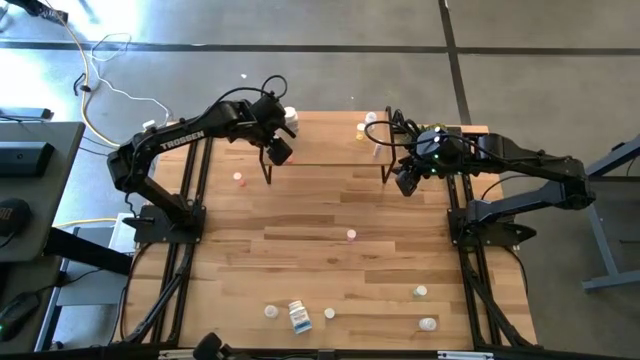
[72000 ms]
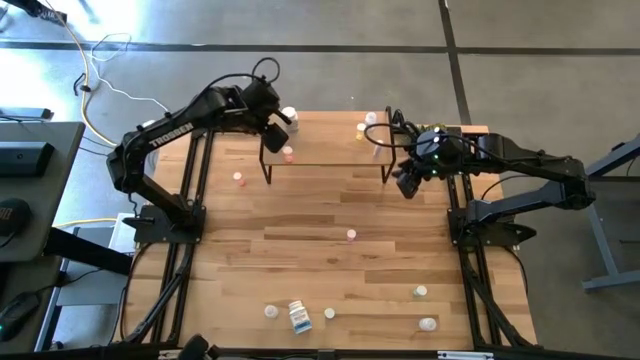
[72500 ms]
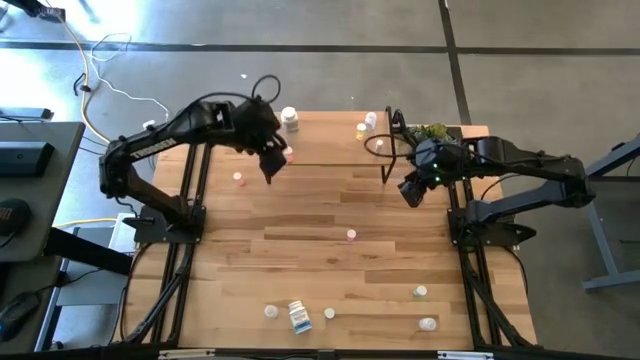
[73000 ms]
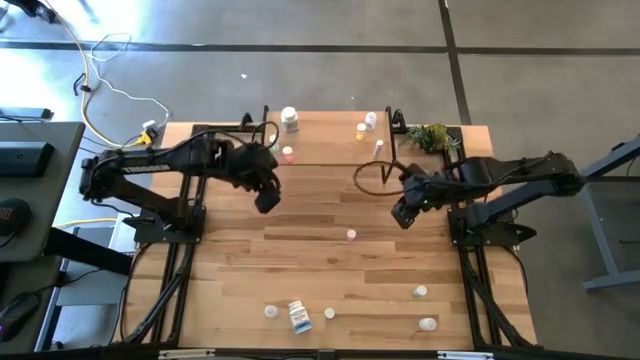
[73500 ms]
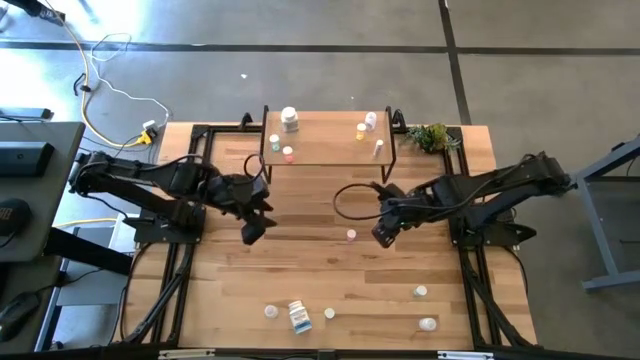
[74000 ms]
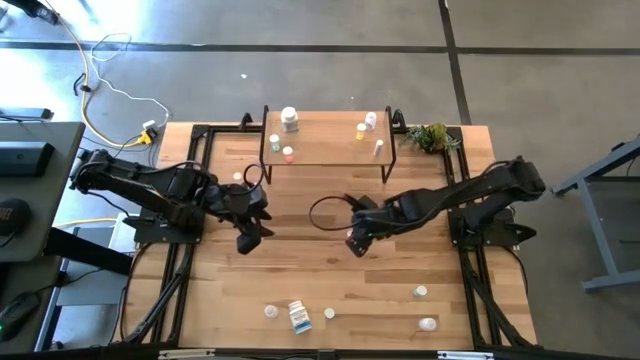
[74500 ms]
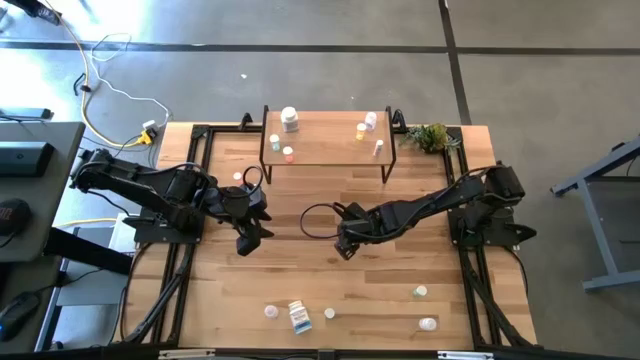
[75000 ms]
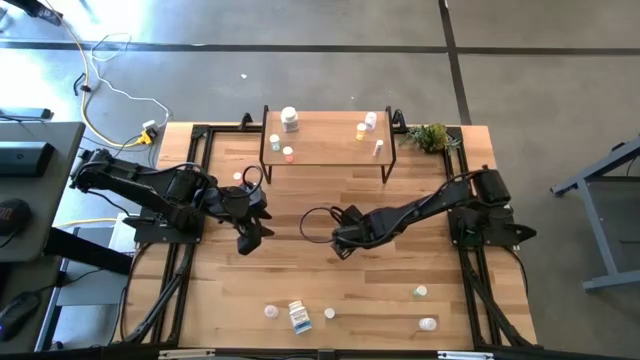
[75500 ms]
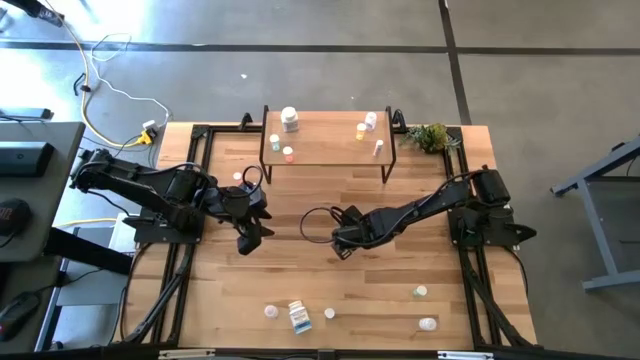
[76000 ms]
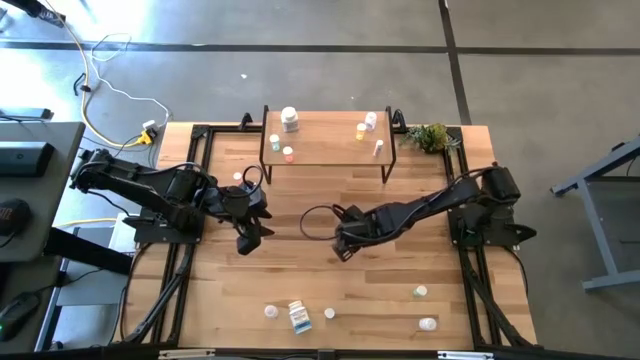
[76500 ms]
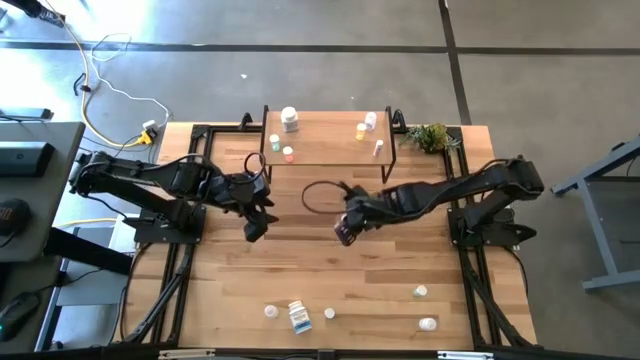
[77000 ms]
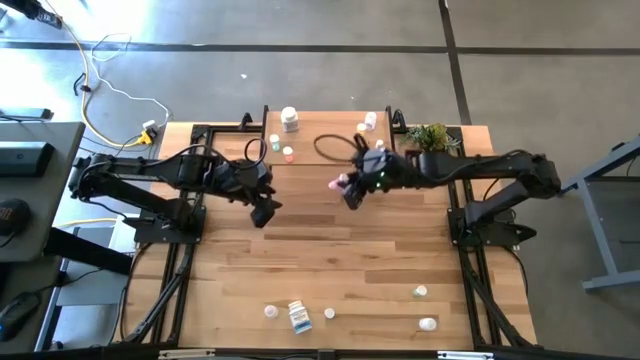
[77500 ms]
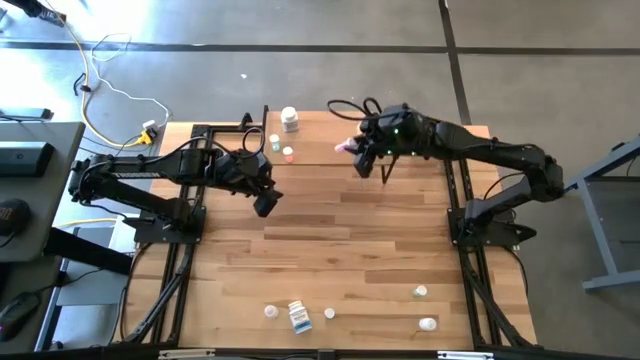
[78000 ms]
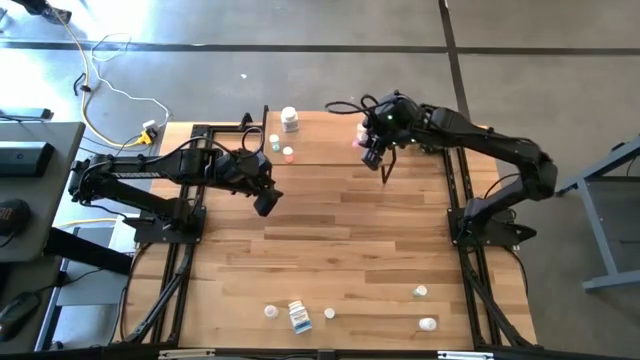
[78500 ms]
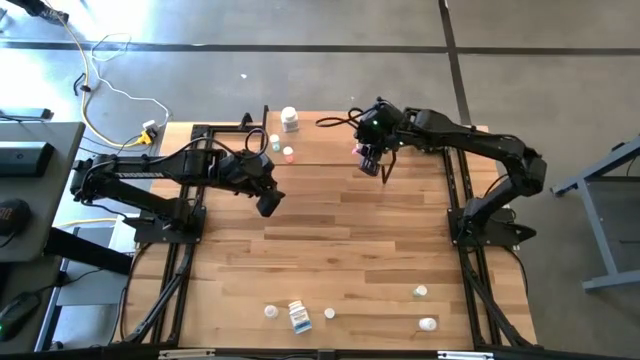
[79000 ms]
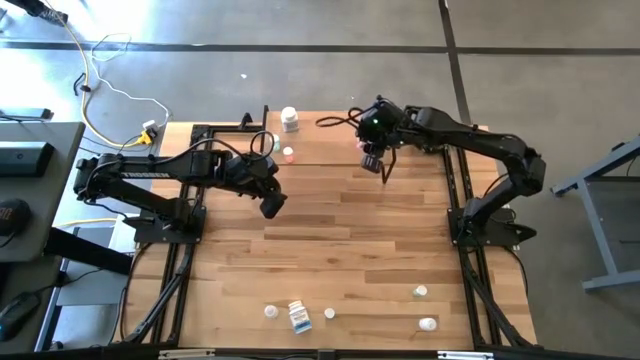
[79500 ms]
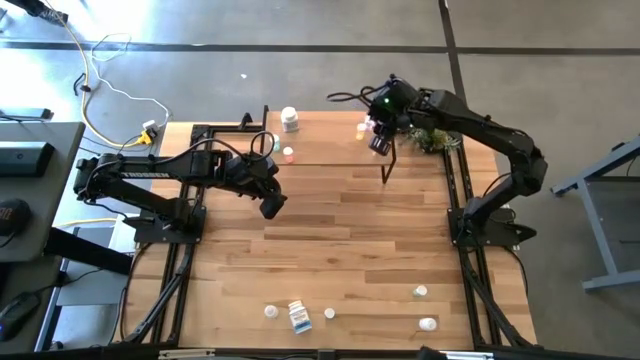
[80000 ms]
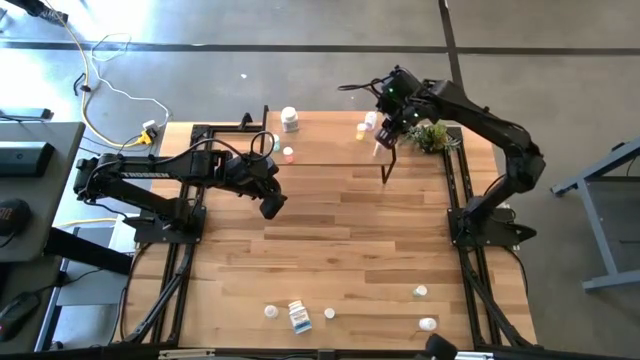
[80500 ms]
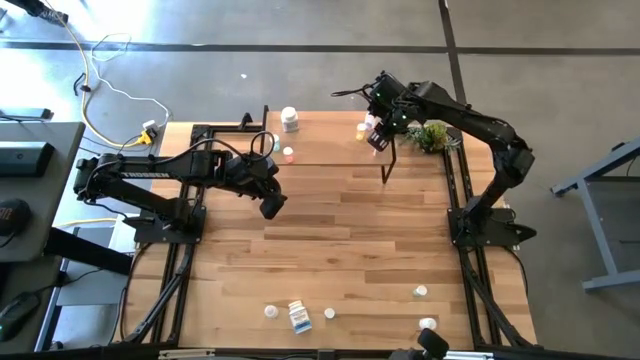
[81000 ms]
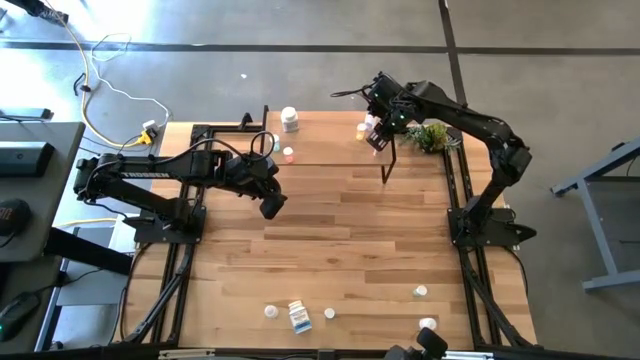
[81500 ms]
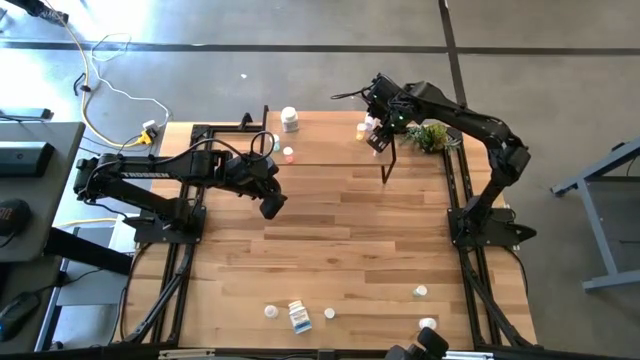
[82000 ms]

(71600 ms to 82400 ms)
Task: Pick and place medicine bottles onto shelf by color
Put the purple pill bottle on the shelf

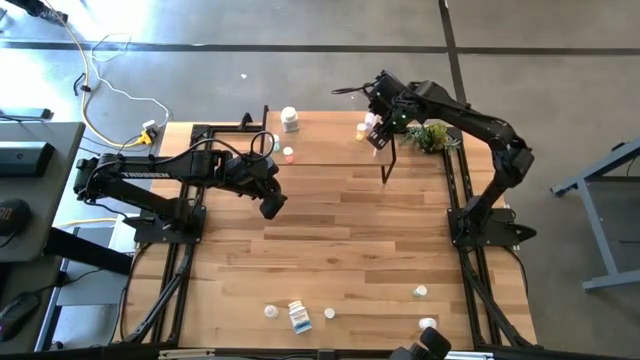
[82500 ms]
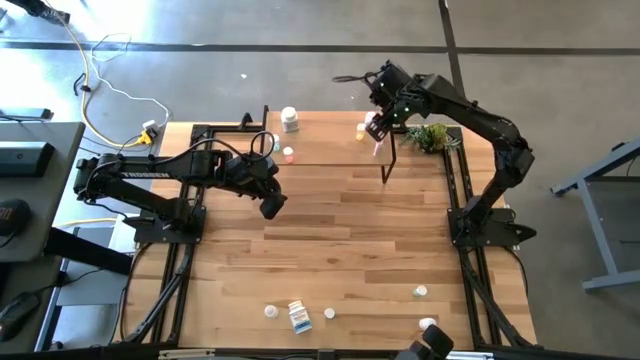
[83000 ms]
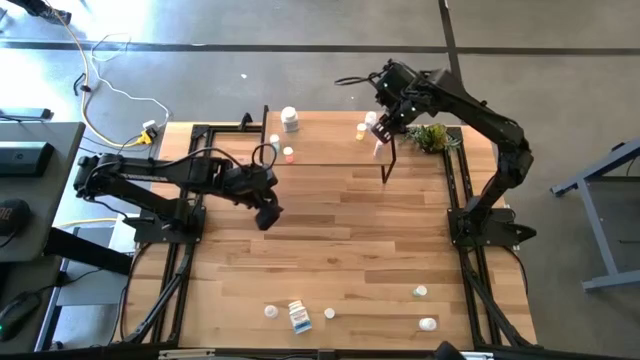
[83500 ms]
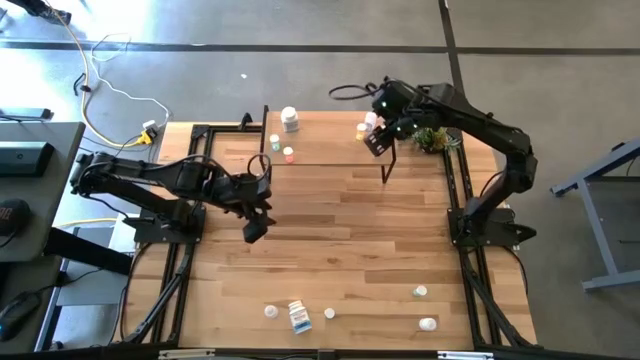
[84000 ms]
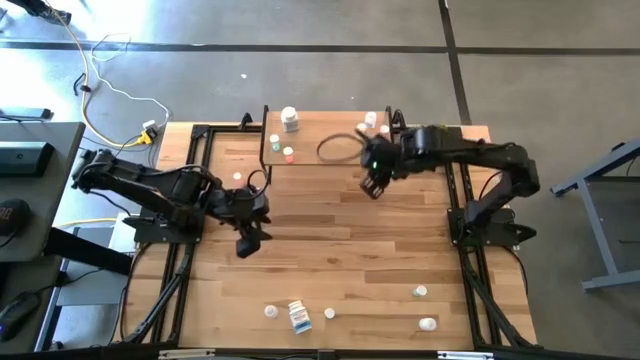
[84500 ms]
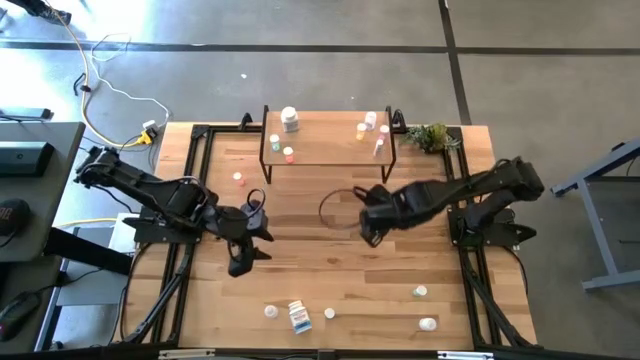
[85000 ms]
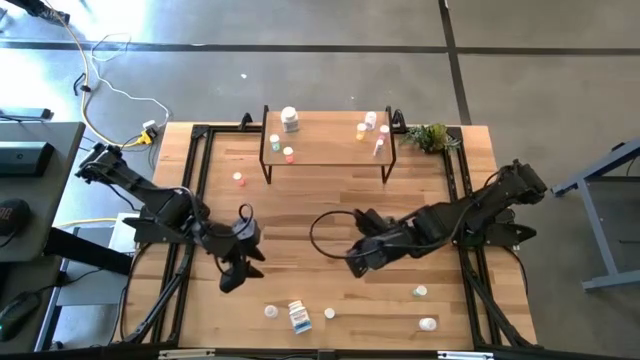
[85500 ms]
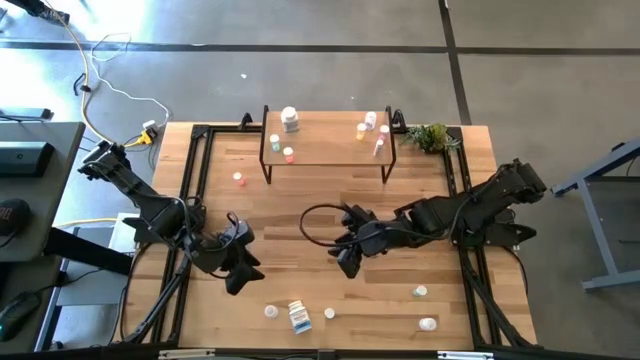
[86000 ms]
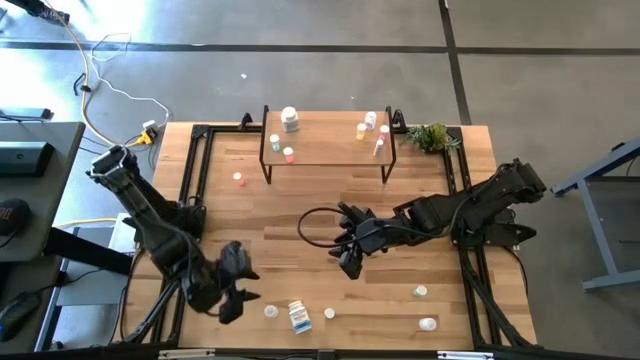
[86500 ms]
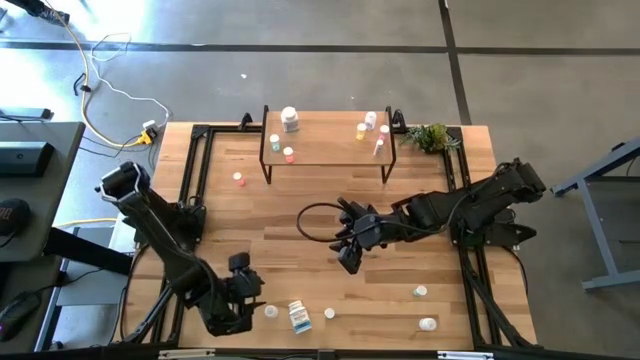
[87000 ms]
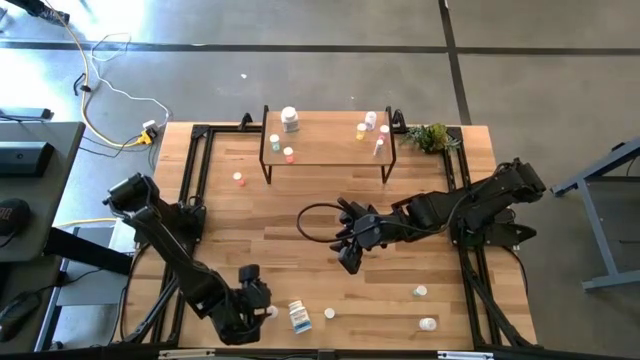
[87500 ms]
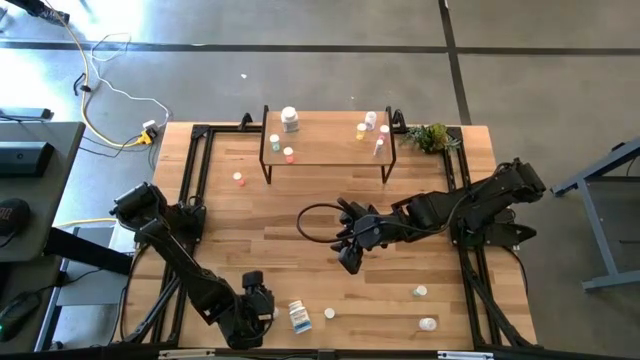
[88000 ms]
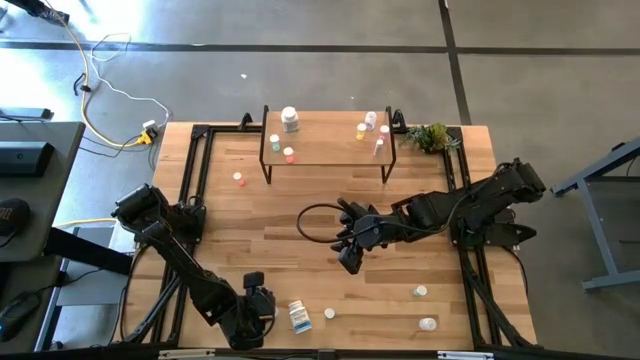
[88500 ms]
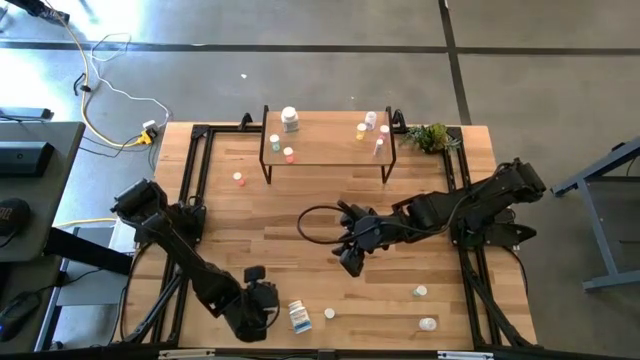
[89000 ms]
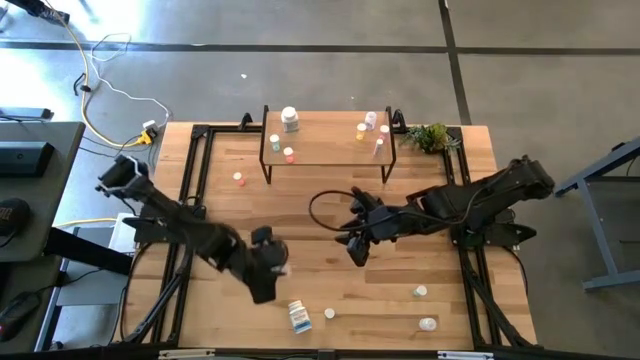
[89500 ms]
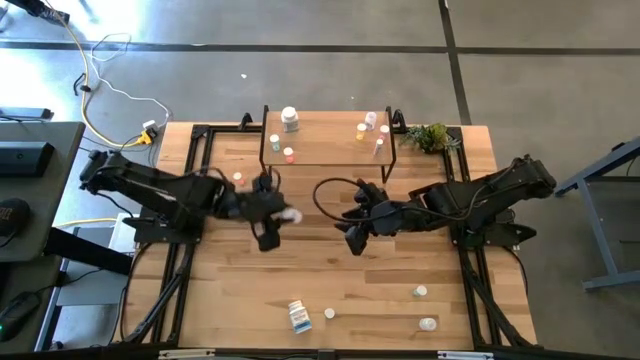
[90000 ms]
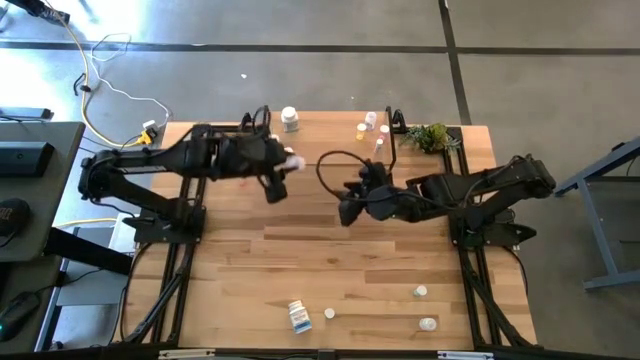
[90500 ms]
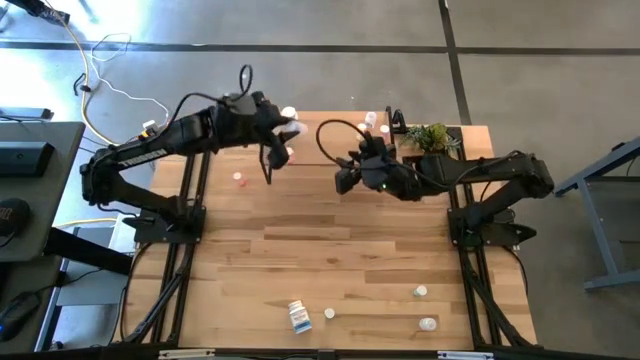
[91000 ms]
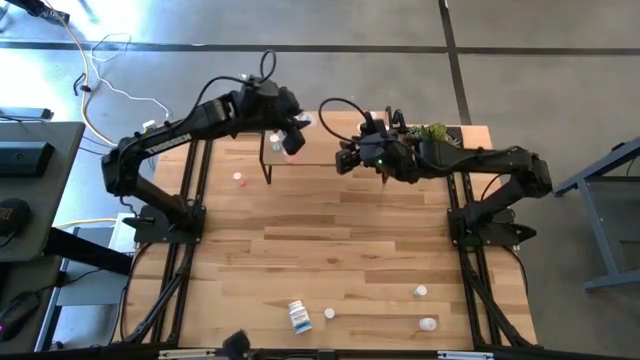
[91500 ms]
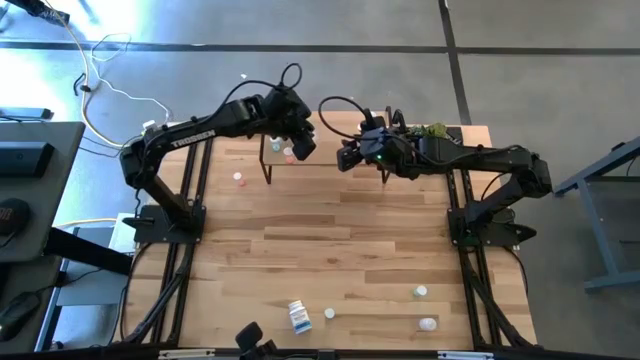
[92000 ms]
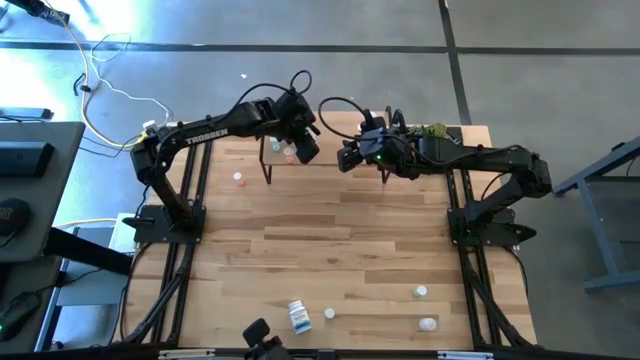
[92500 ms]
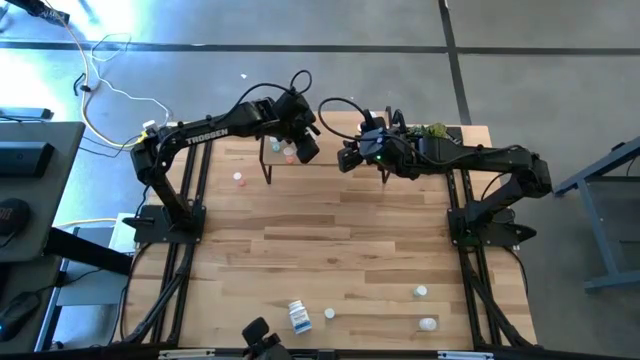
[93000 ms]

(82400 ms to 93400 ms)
Put the left transparent pill bottle on the shelf
